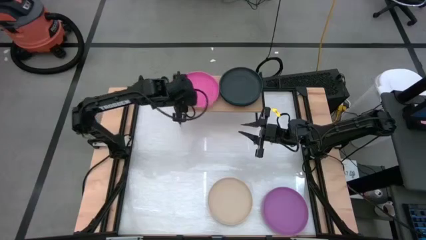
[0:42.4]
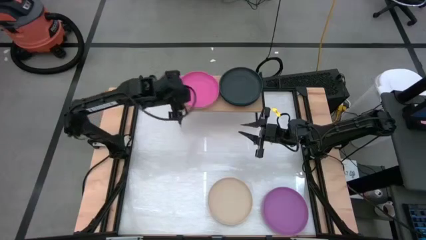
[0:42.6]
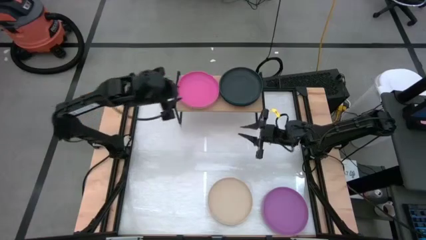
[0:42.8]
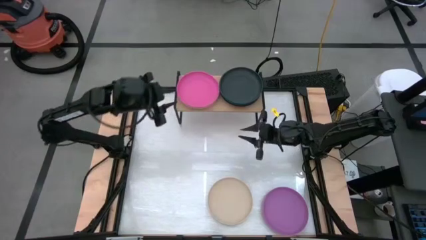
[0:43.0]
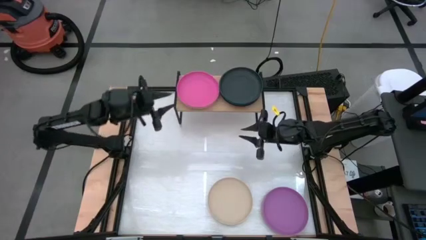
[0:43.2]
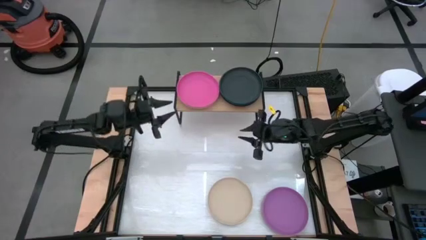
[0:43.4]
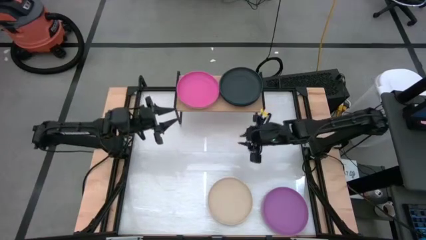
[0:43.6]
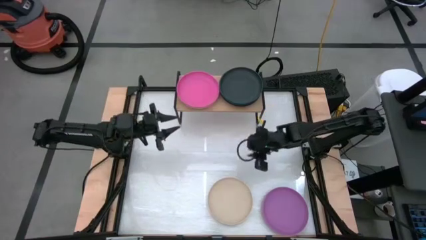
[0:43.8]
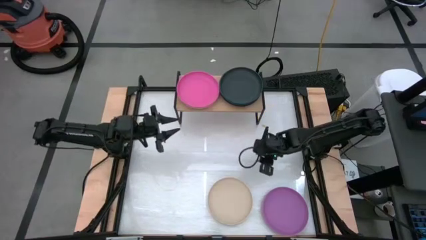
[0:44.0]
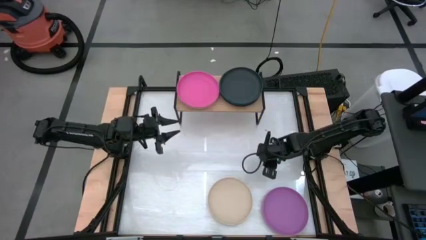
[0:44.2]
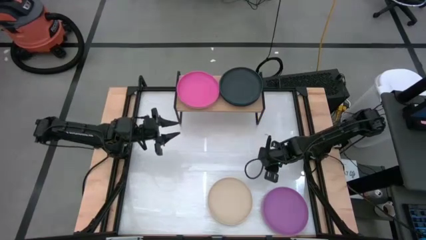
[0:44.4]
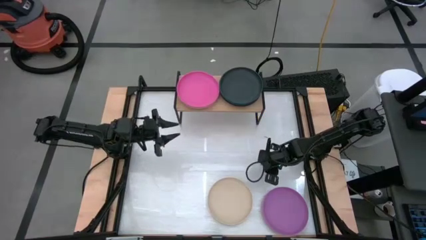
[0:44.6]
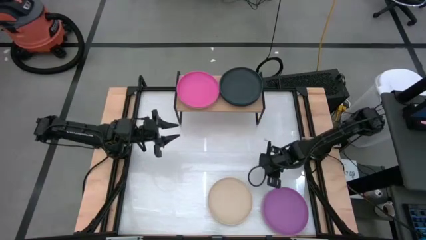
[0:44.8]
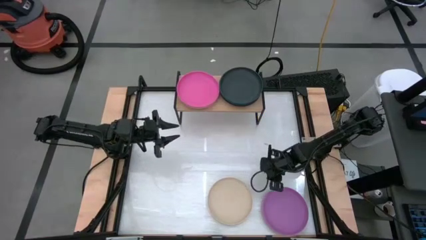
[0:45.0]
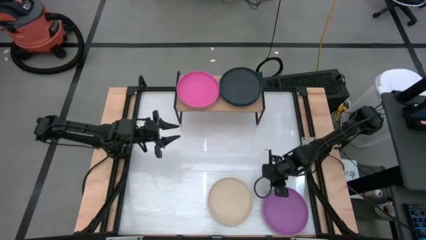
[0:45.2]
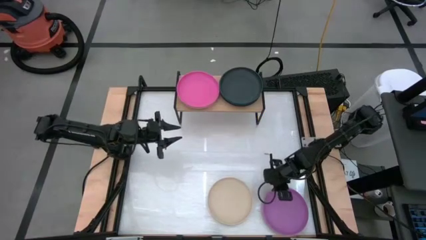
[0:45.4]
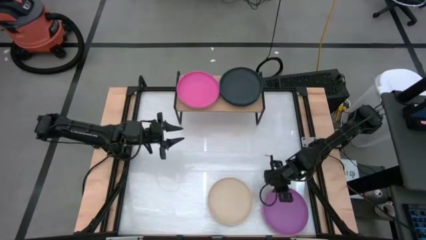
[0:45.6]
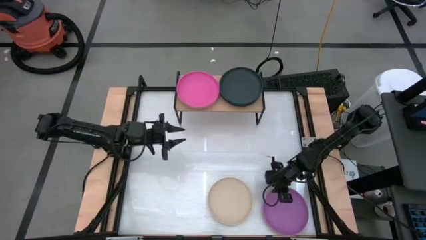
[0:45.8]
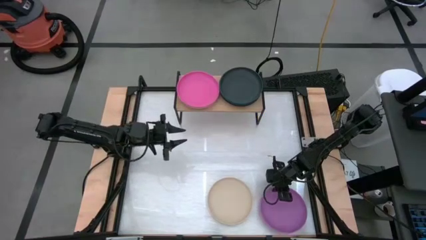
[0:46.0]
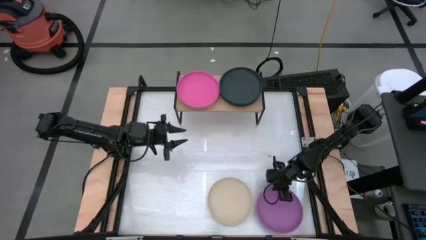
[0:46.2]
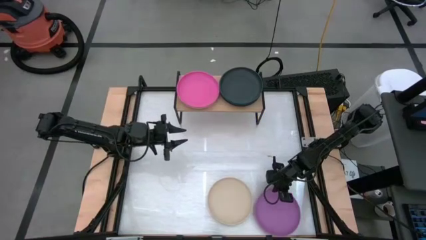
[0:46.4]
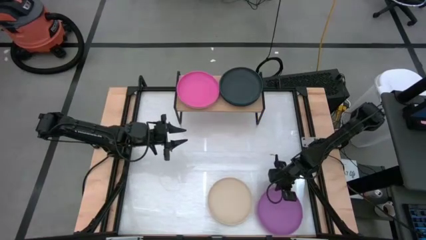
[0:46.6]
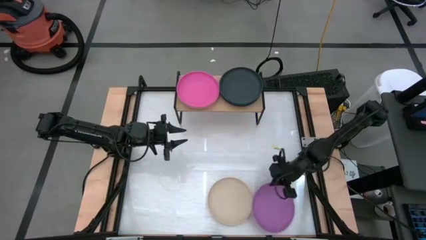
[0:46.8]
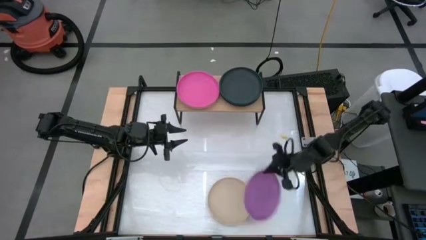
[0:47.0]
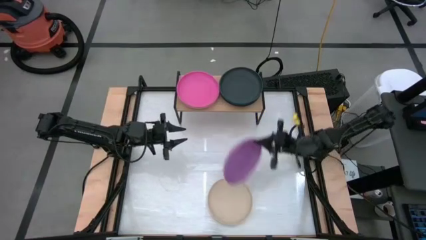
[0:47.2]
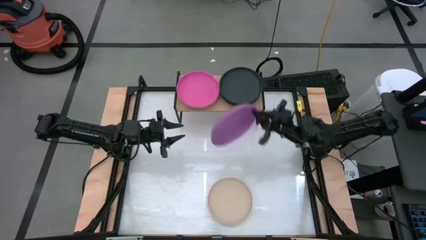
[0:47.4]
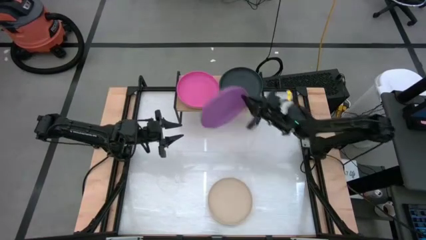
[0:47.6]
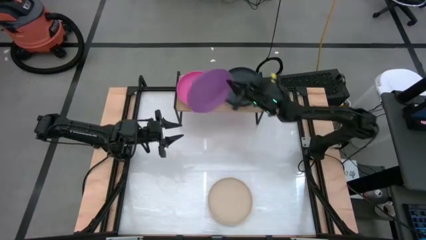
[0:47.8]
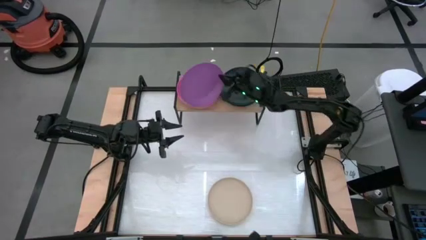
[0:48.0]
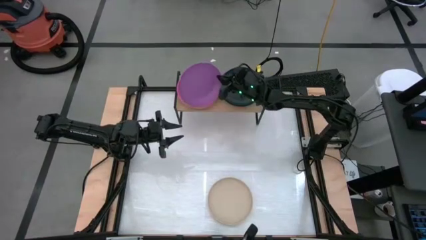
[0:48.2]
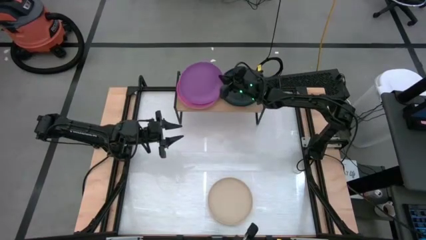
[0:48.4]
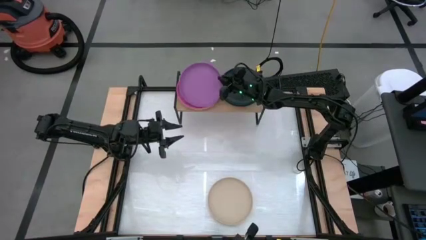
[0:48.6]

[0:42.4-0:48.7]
Task: Place and stack plates onto a shelf
Stack the violet plate on the pink plate on the shelf

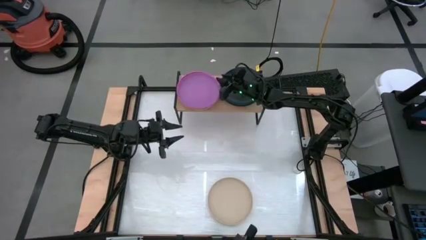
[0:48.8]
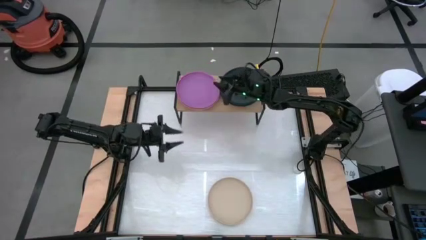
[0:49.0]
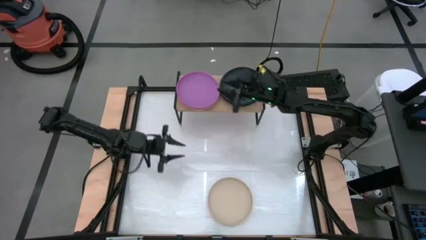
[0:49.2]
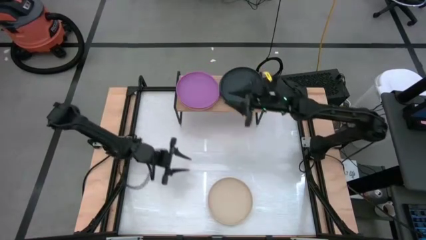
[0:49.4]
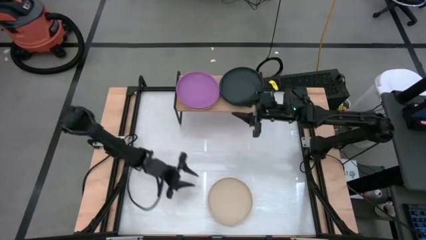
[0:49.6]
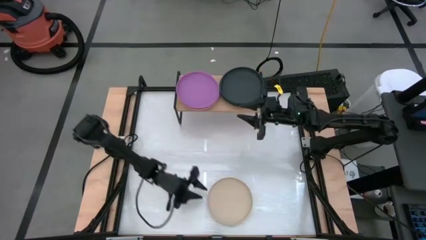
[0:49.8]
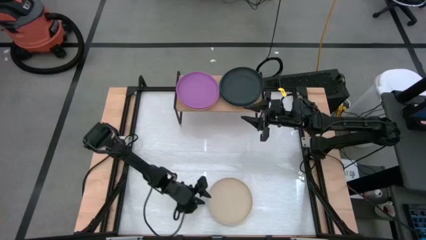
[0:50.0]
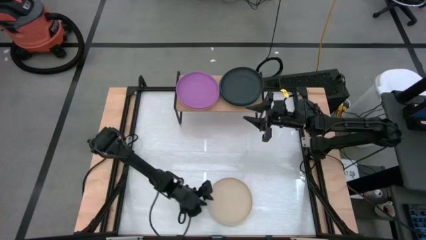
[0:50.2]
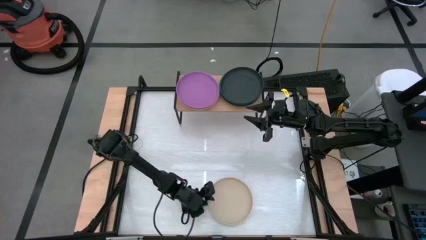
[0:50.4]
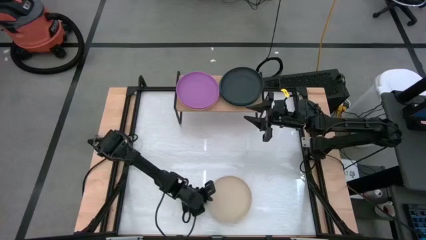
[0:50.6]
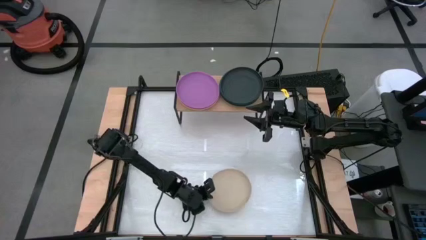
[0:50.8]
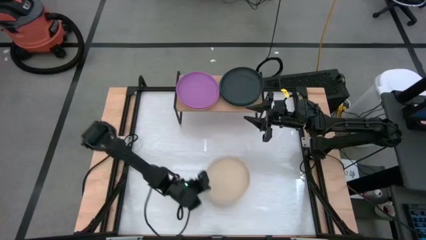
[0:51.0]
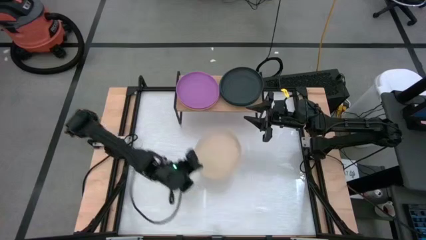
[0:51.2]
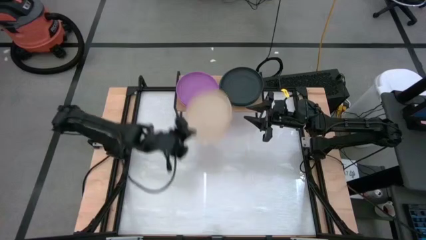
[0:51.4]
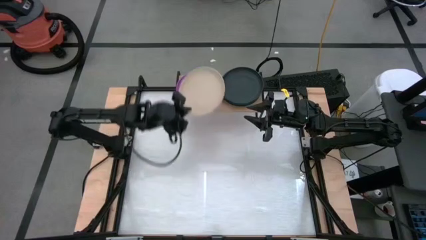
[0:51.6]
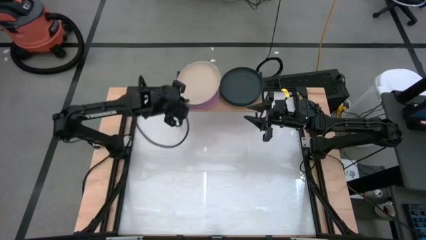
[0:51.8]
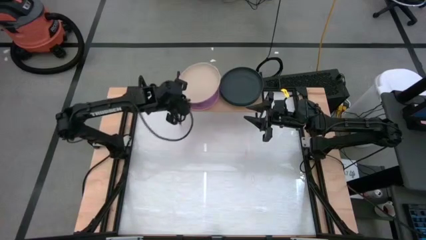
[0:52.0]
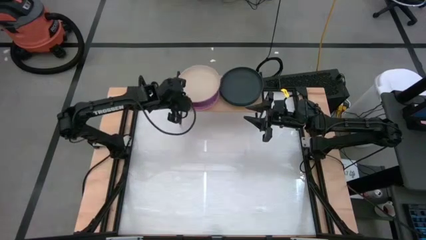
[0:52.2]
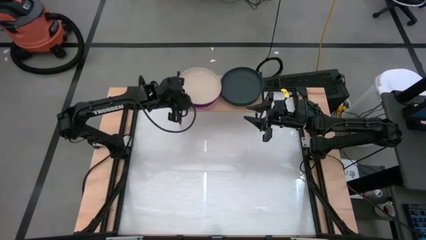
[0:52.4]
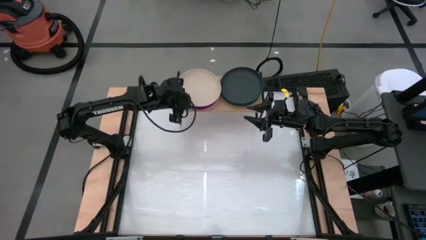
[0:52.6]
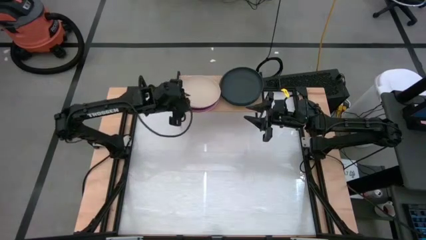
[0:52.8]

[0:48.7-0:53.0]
Stack the light brown plate on the violet plate on the shelf

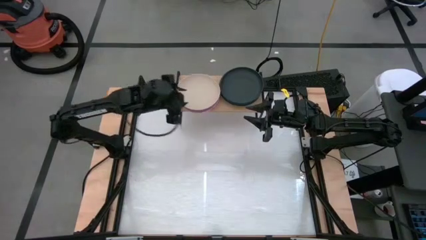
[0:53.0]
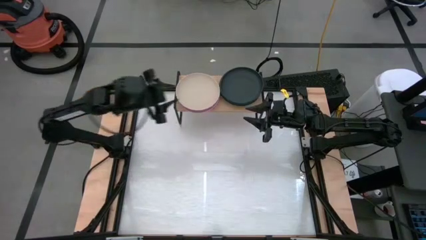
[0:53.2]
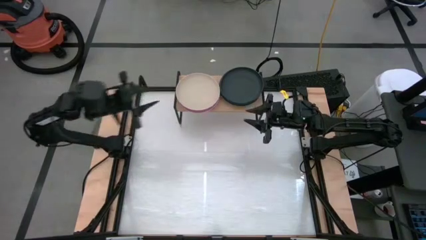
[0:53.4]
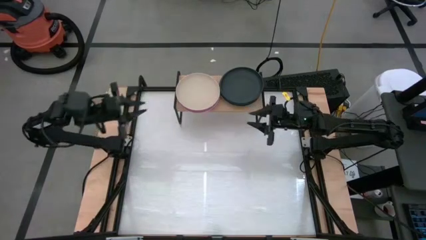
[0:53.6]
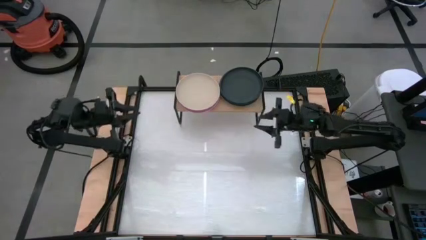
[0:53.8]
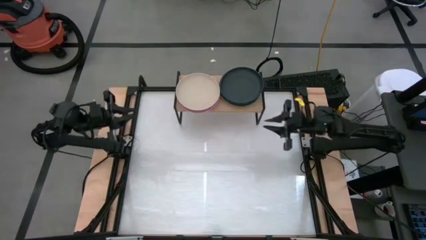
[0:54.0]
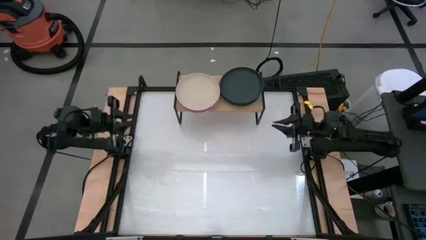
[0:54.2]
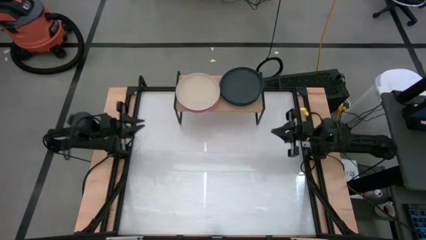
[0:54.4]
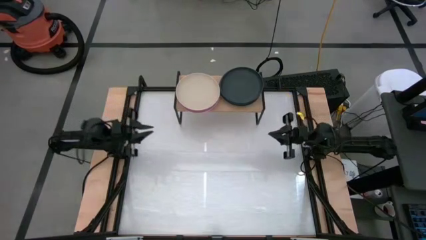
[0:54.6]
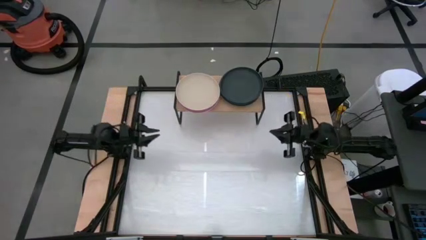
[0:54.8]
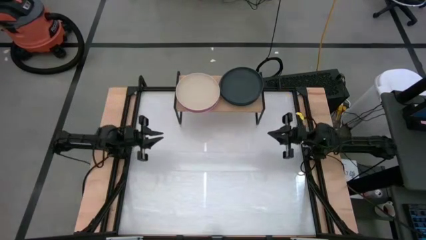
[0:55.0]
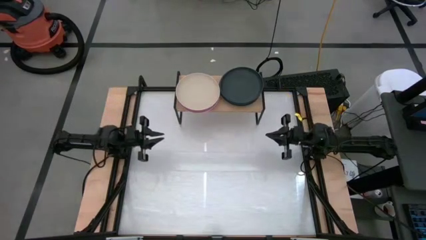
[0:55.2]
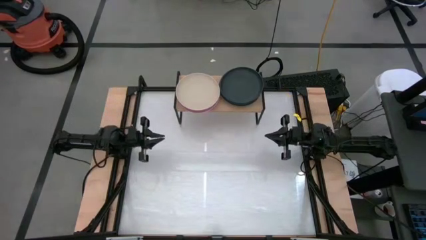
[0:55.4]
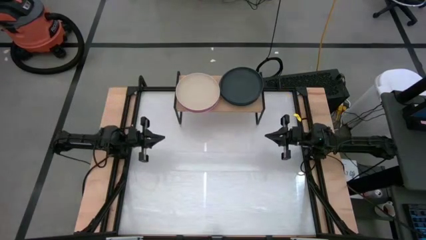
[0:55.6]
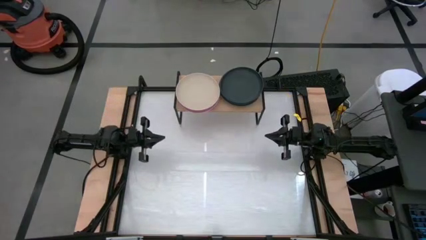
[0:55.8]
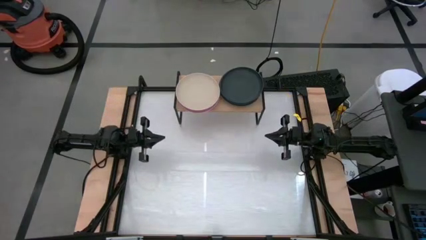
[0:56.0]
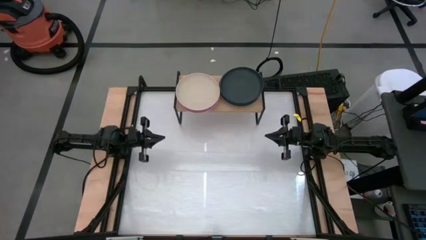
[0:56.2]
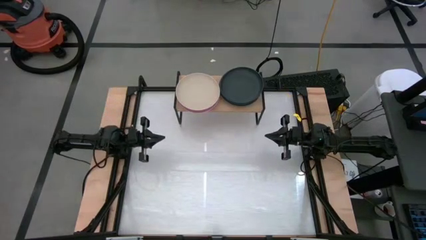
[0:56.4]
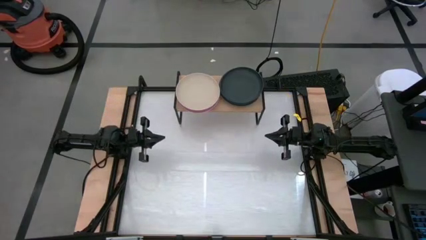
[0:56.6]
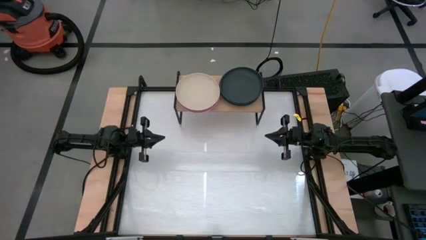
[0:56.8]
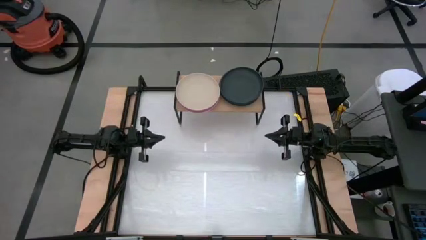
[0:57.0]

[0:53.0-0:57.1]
Return to Home Position
